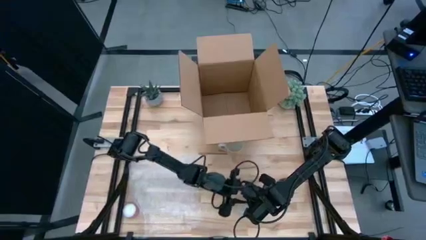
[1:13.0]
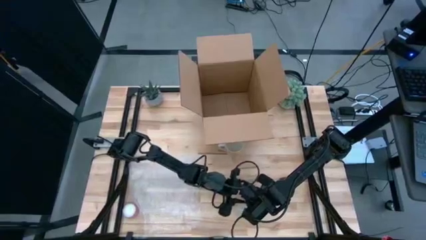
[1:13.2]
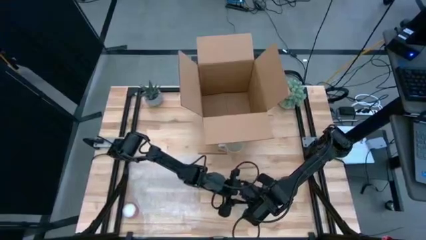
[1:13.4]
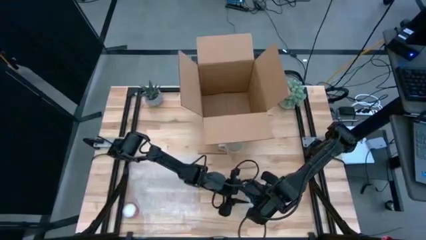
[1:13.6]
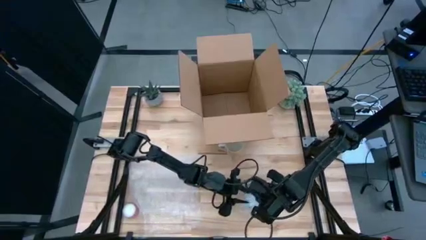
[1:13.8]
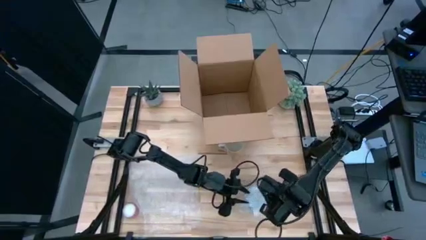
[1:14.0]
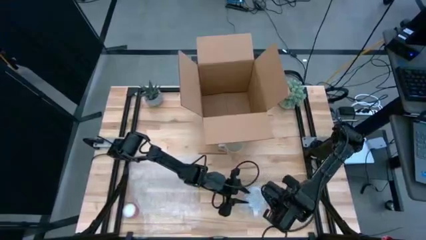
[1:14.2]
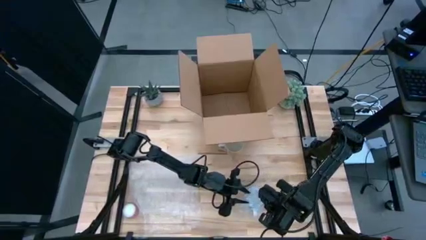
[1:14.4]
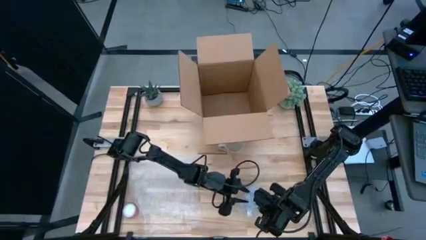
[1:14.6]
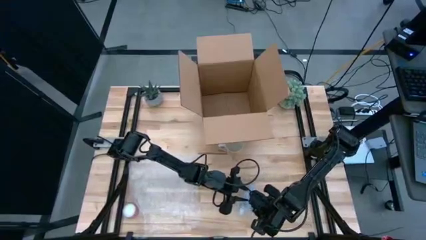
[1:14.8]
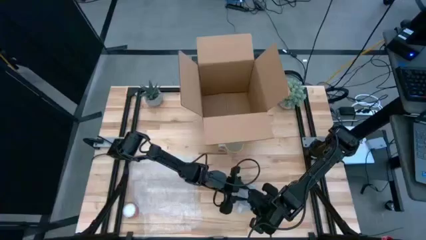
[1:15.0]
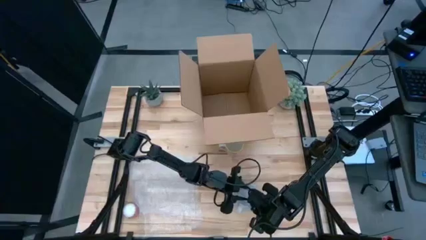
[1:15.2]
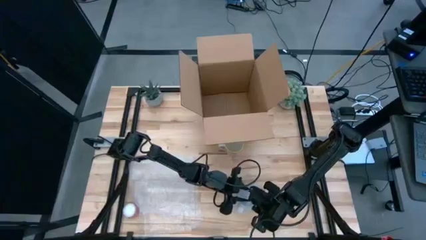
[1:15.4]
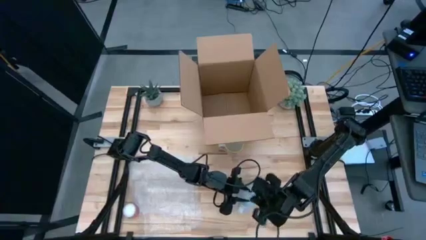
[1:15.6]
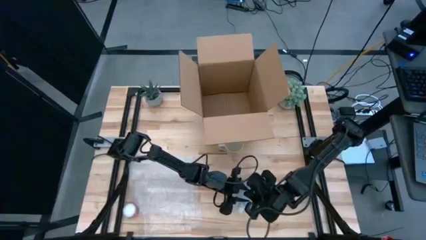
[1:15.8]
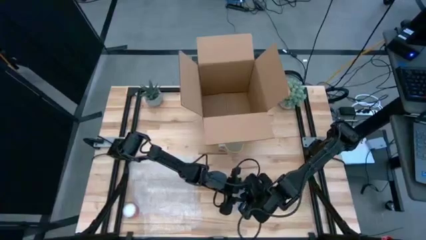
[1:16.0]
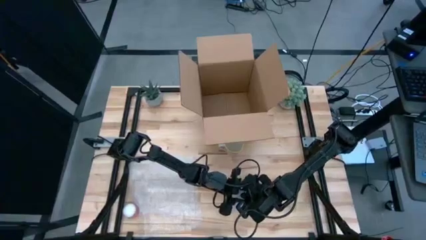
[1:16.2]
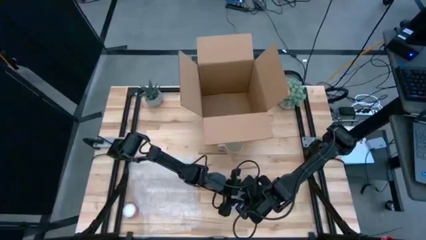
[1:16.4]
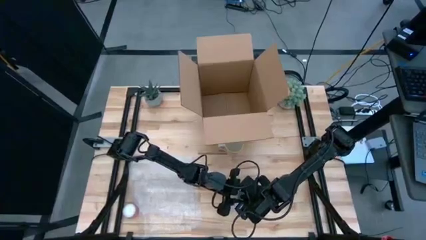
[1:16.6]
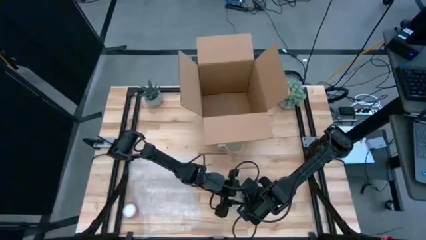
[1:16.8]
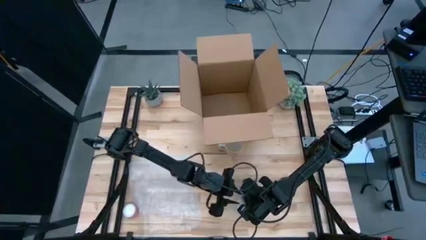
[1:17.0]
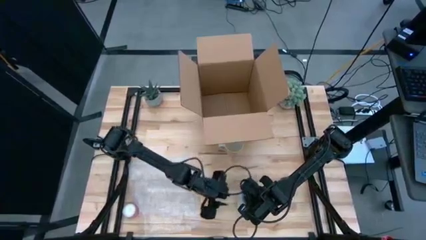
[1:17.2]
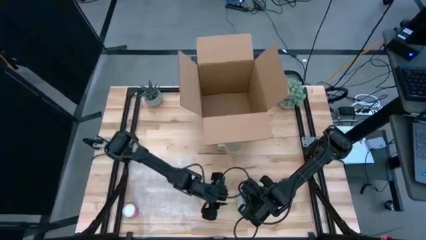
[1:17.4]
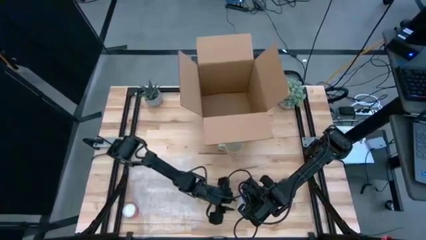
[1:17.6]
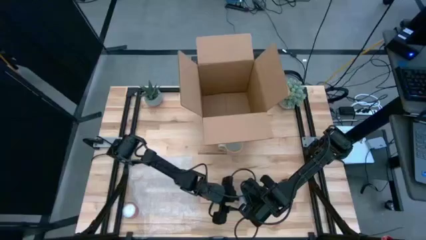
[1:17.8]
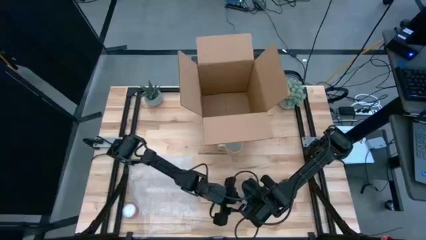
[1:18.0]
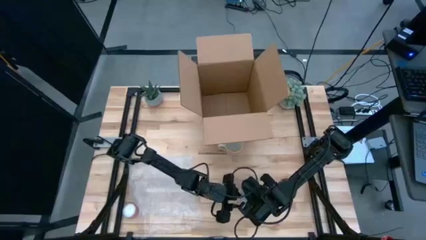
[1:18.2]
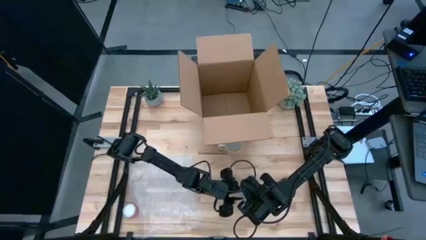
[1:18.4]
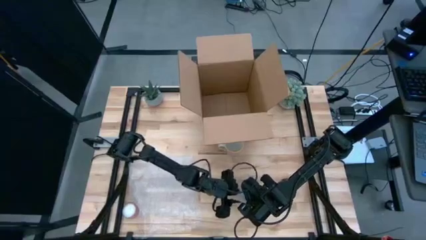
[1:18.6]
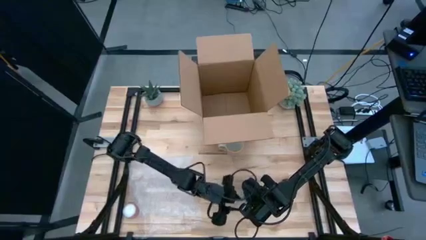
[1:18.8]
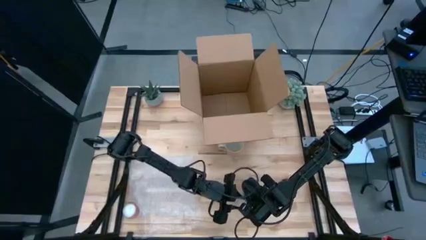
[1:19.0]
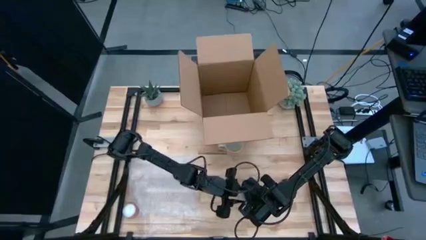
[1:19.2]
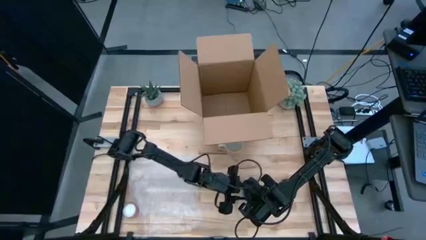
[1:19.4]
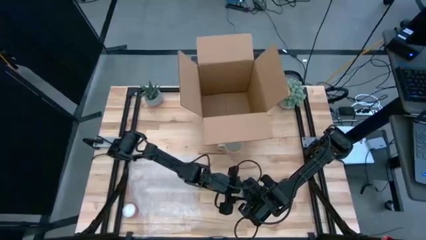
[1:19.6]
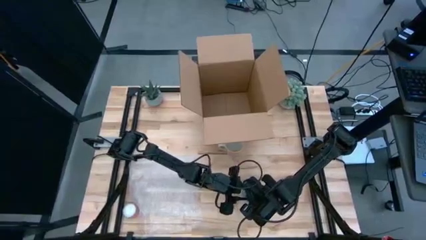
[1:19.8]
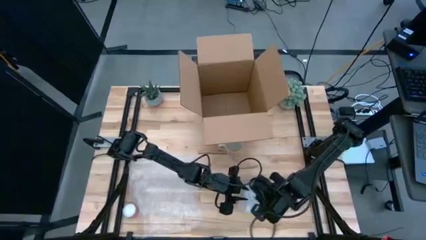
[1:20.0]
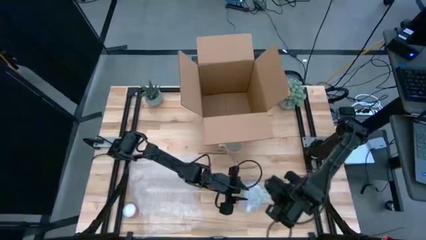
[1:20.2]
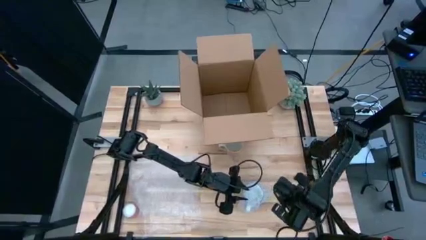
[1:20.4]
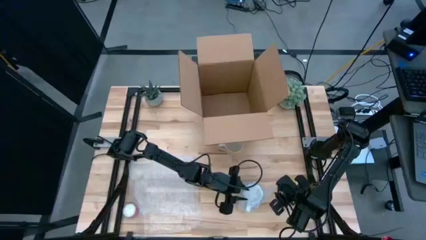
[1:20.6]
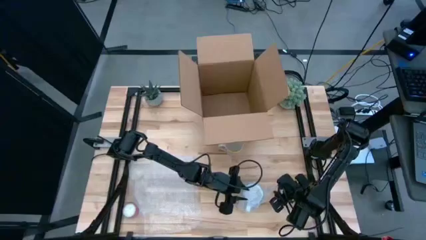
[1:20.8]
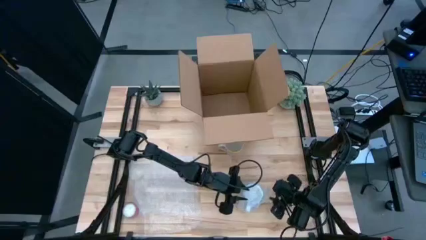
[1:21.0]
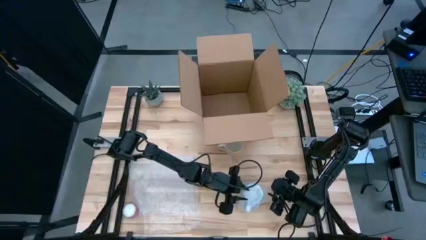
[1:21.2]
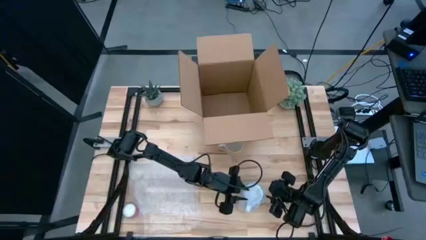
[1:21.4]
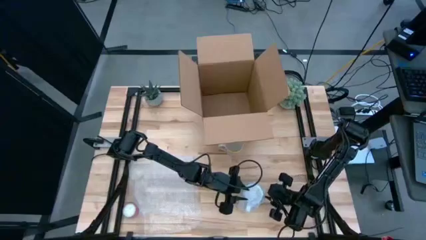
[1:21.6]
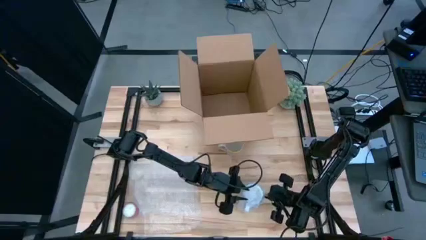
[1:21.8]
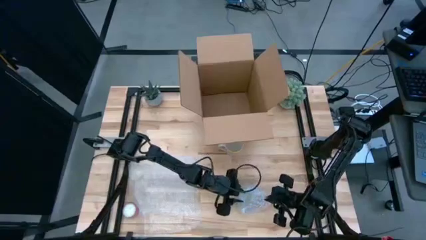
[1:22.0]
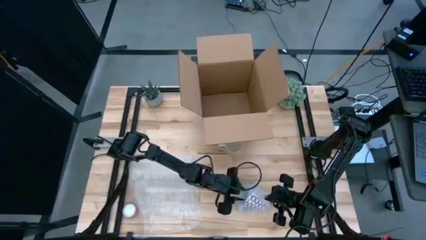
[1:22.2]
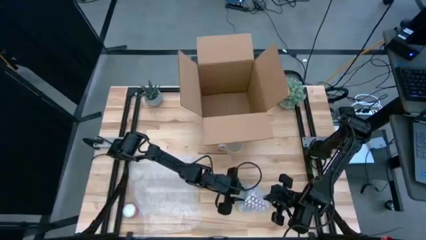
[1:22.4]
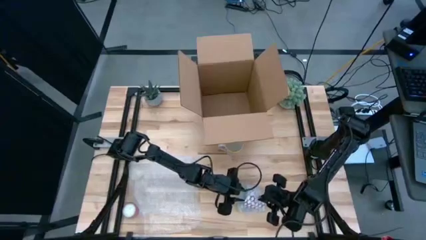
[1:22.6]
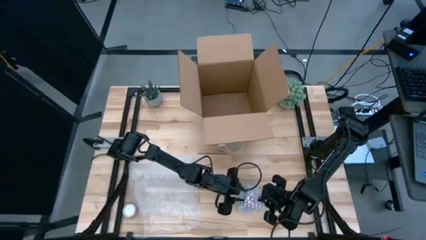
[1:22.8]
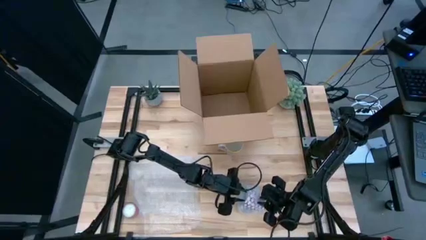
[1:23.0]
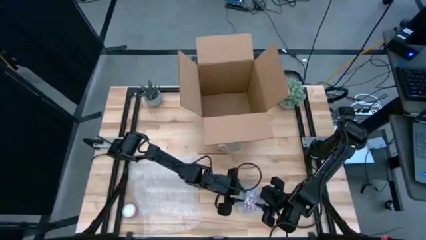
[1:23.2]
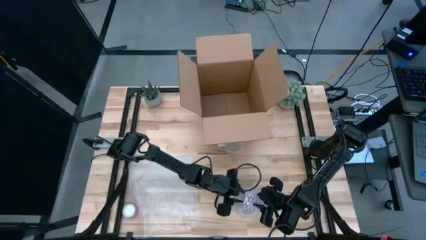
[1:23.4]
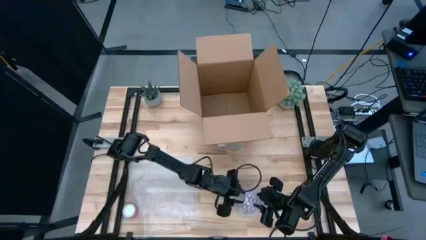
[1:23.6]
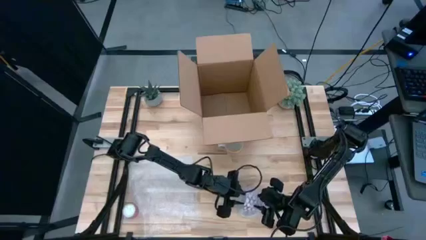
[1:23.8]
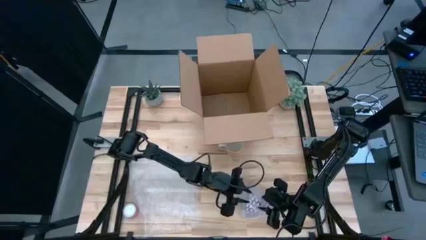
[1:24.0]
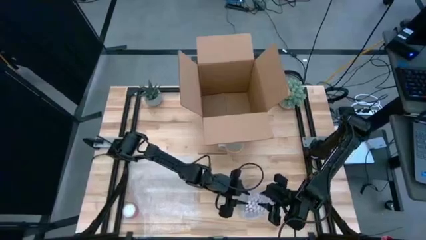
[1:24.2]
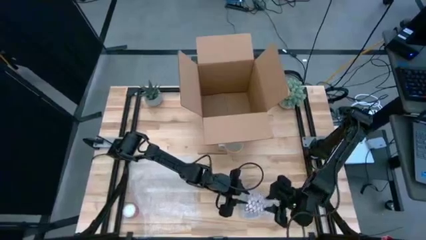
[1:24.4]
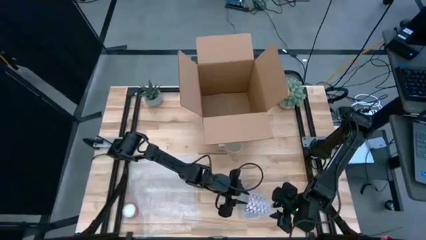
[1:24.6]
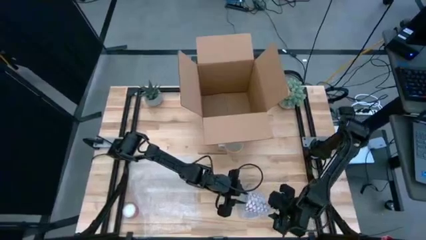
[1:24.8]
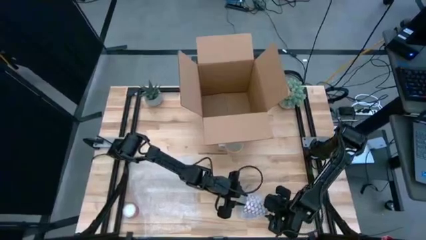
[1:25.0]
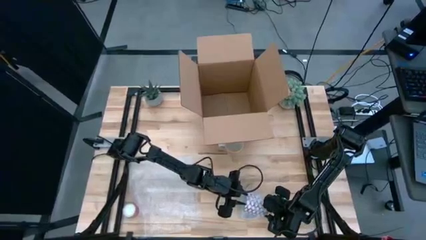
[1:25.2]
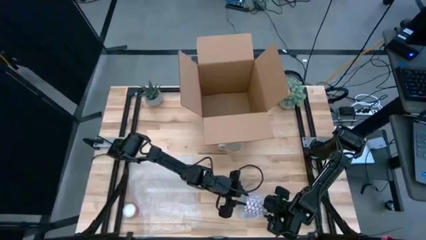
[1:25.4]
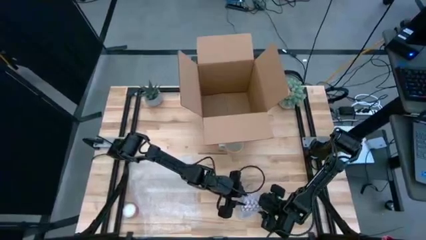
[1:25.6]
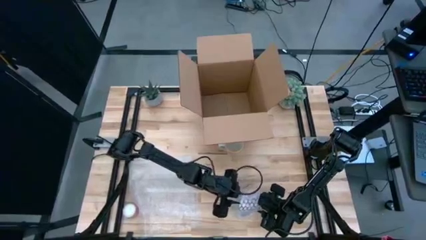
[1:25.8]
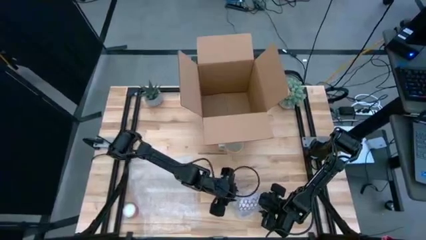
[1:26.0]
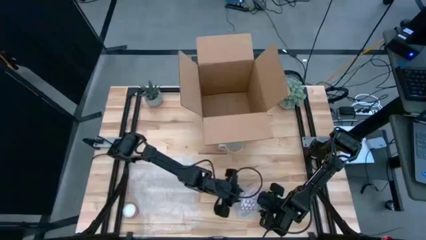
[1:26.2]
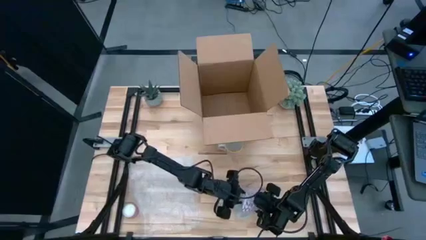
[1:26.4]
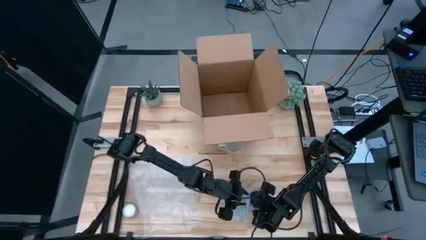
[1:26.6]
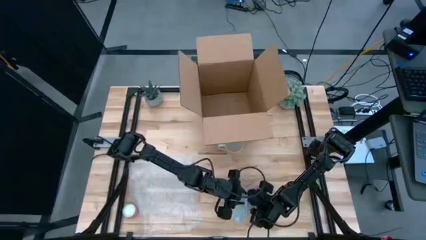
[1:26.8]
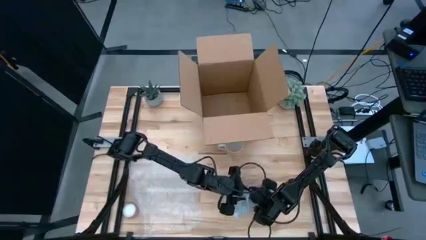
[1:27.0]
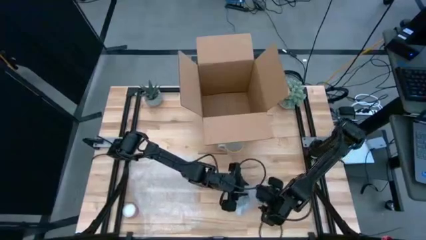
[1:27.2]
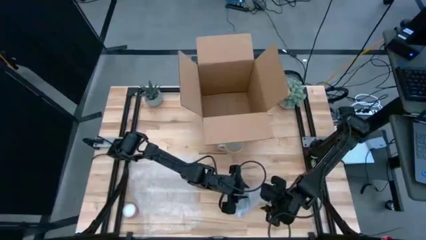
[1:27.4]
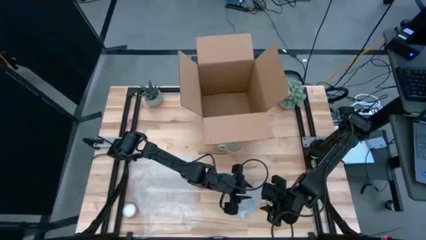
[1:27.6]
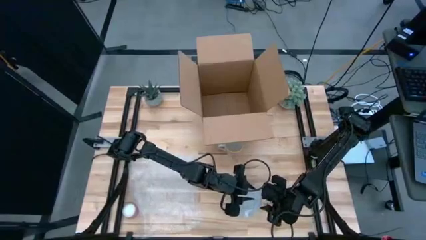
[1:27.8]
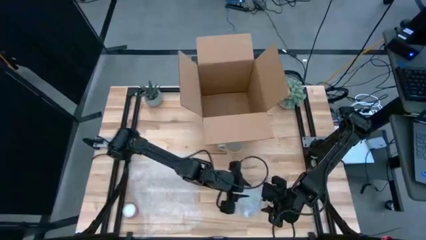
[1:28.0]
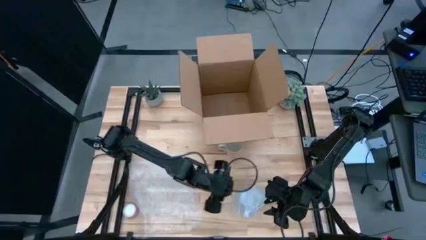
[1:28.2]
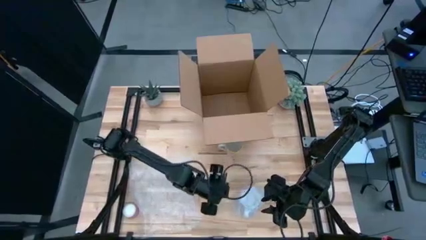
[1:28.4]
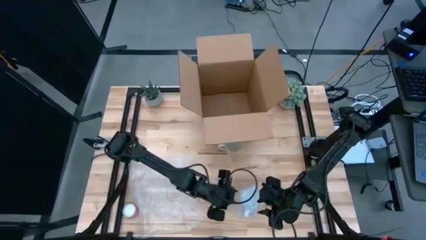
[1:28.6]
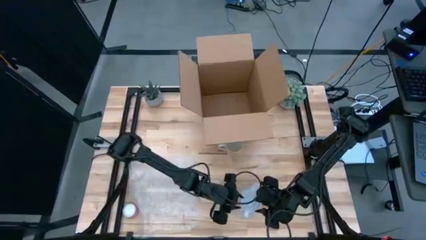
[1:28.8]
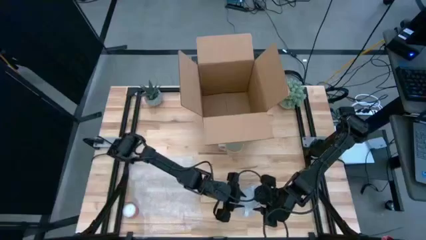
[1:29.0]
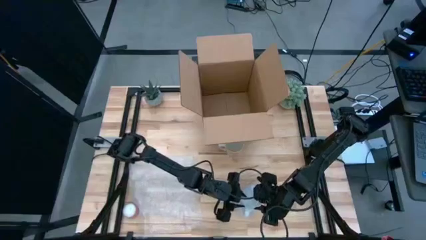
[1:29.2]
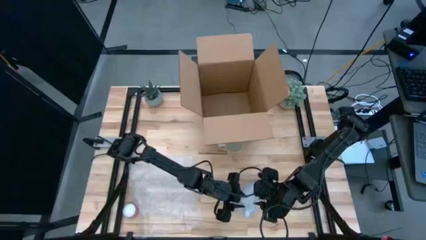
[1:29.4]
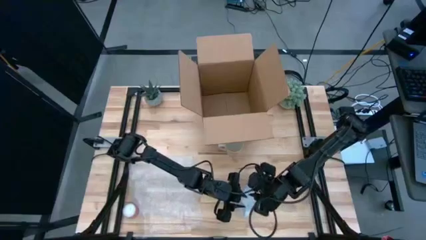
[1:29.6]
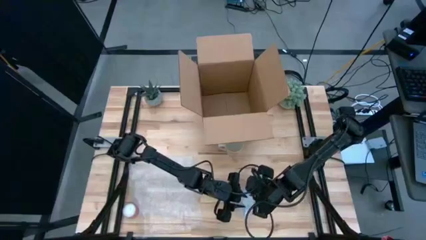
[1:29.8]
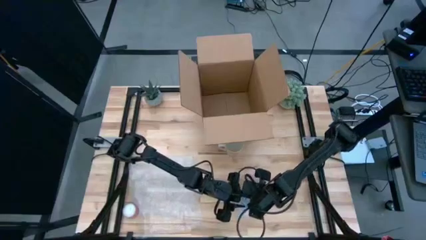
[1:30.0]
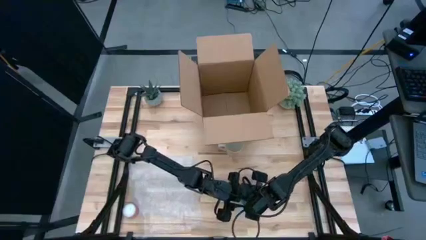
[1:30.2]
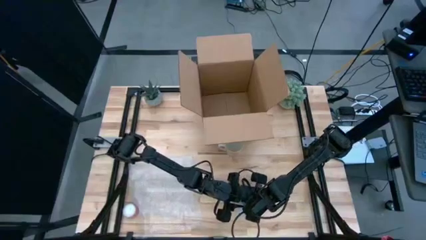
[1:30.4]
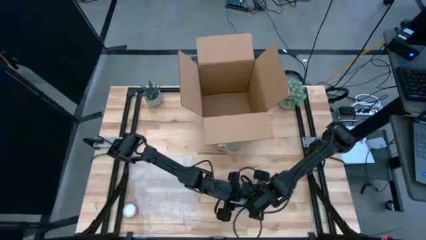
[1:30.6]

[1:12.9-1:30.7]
Task: wrap mug
Wrap the red mug with the right transparent bubble wrap
